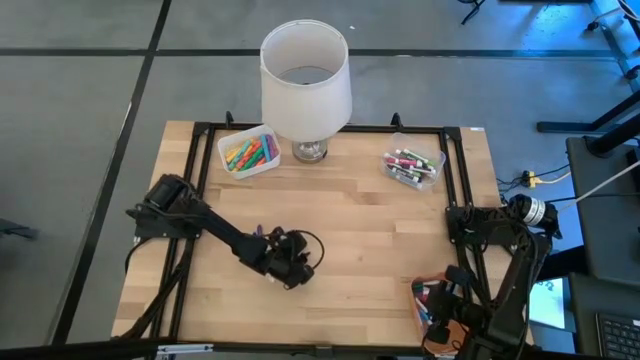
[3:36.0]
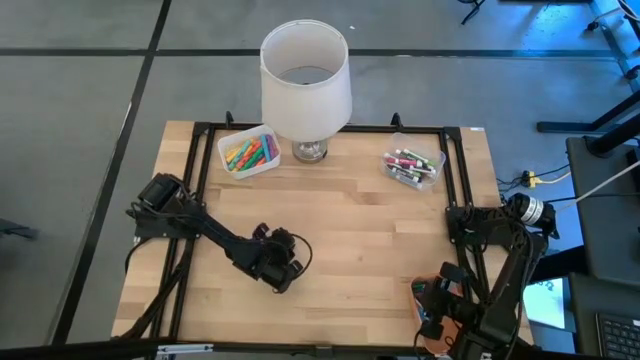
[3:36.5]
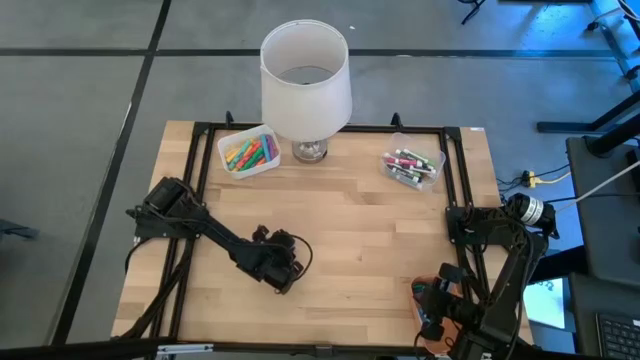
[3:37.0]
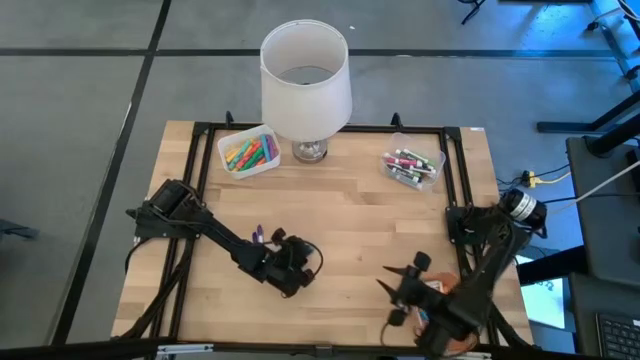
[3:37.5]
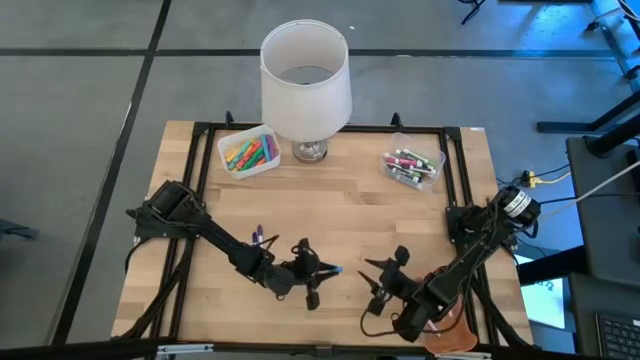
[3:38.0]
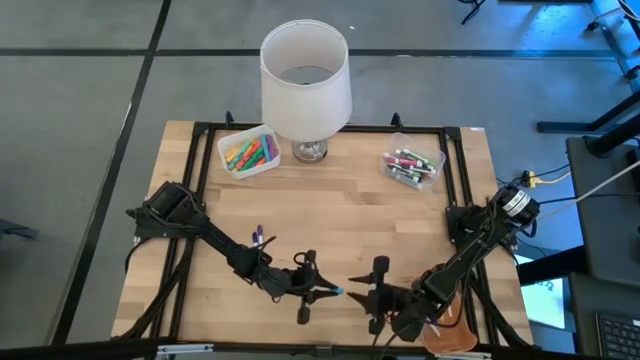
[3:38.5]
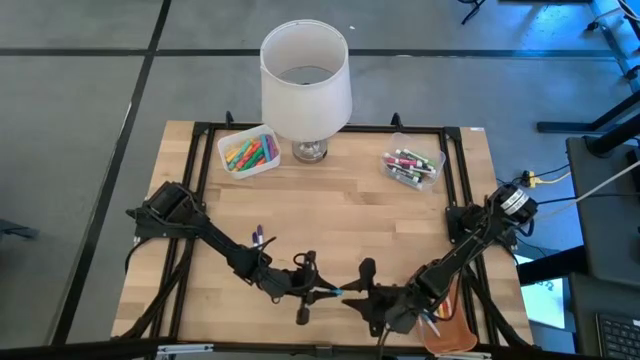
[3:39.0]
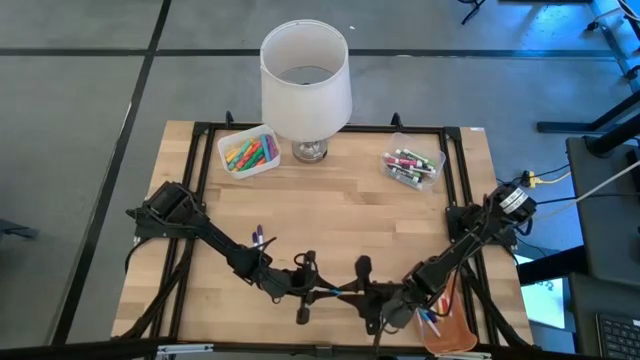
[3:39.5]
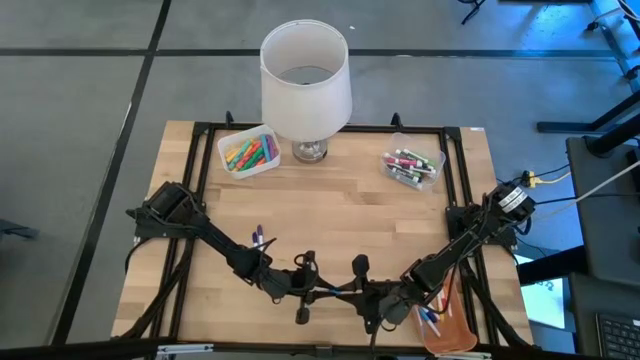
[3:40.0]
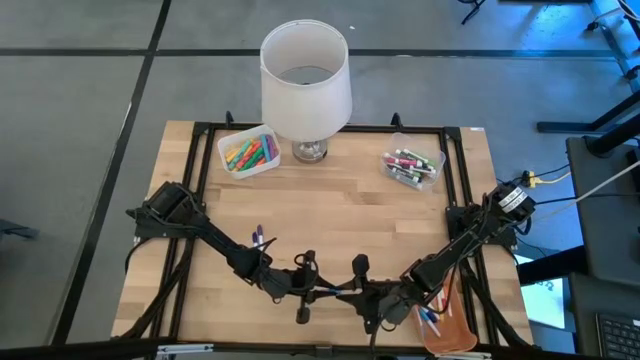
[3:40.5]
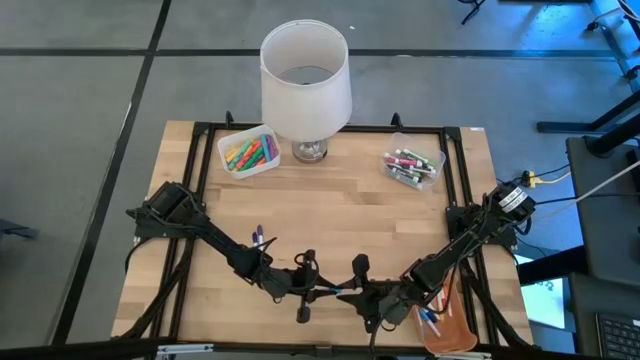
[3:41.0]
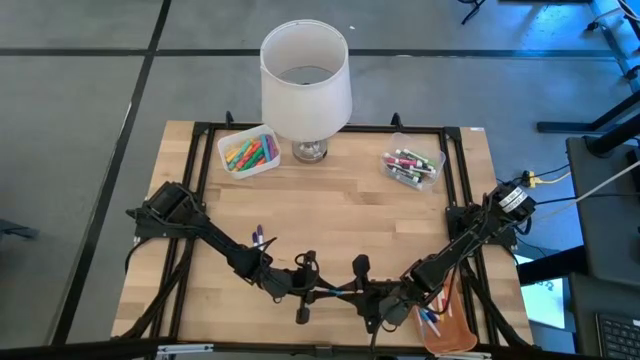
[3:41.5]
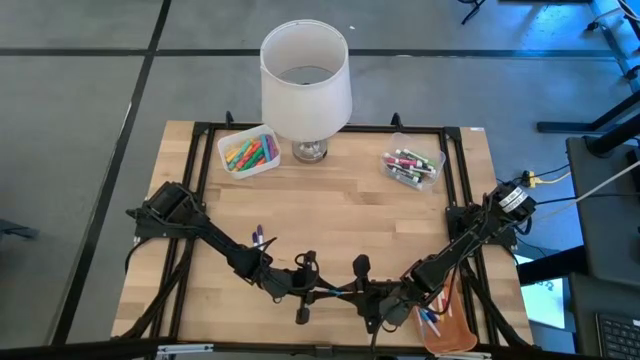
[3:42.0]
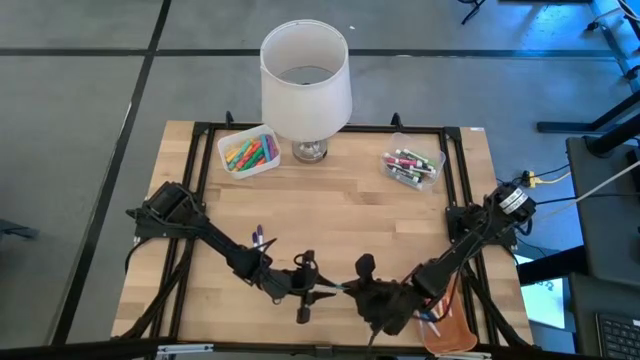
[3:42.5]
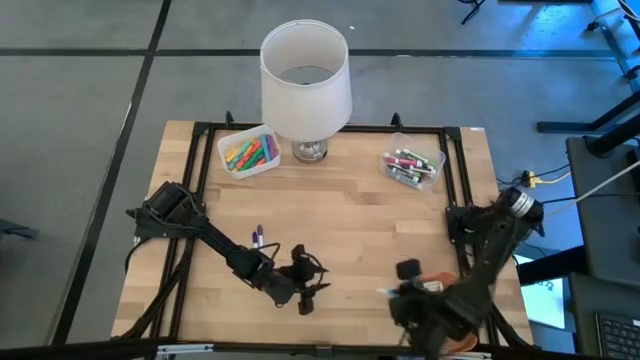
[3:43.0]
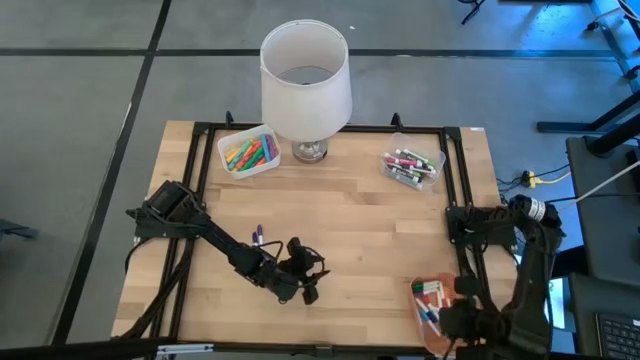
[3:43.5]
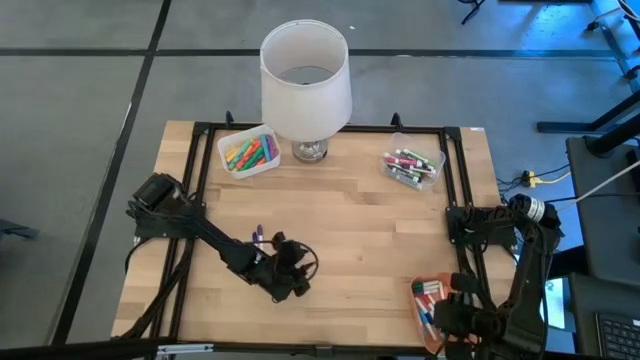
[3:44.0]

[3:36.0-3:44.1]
Task: Pick & Place Markers
Put the light blue mini marker into the orange bin

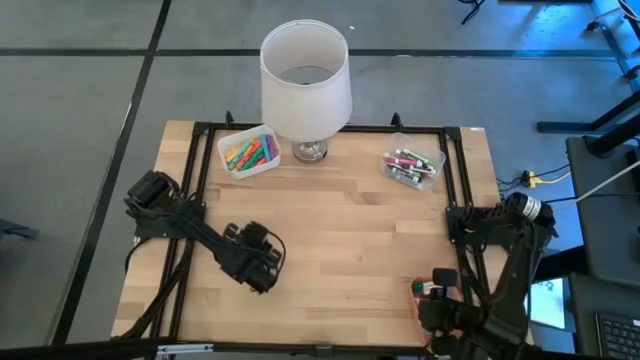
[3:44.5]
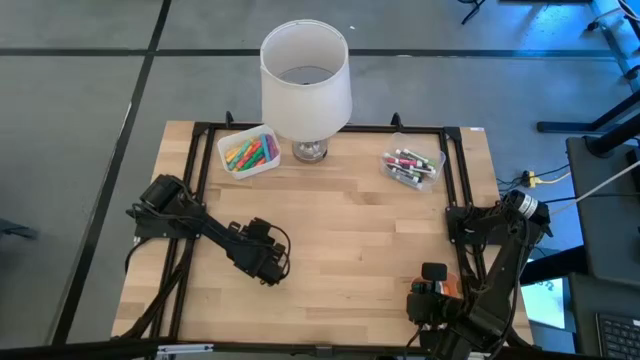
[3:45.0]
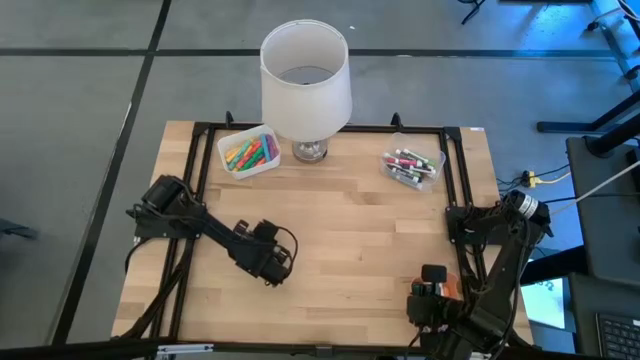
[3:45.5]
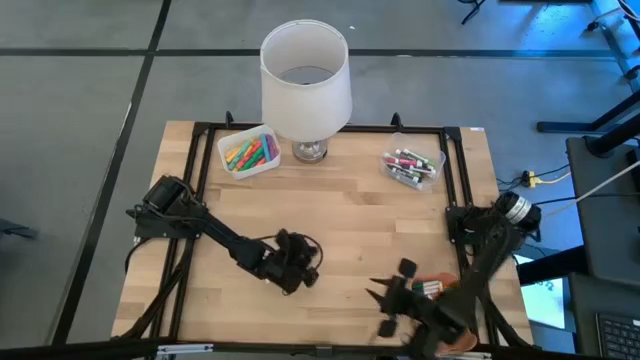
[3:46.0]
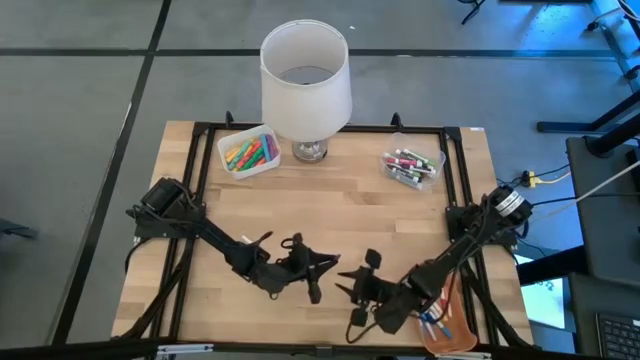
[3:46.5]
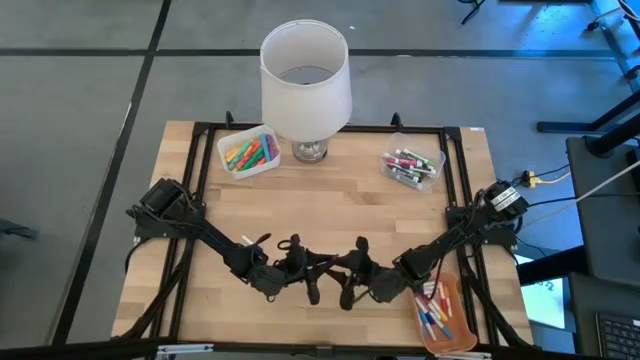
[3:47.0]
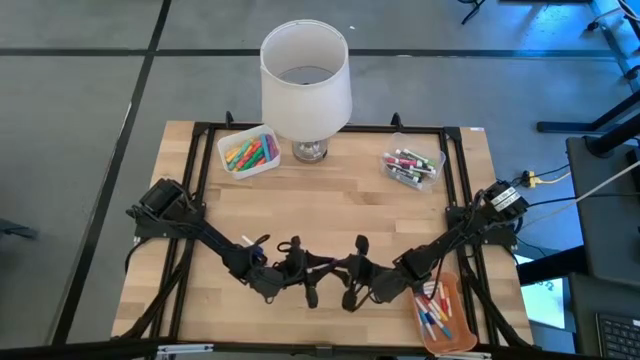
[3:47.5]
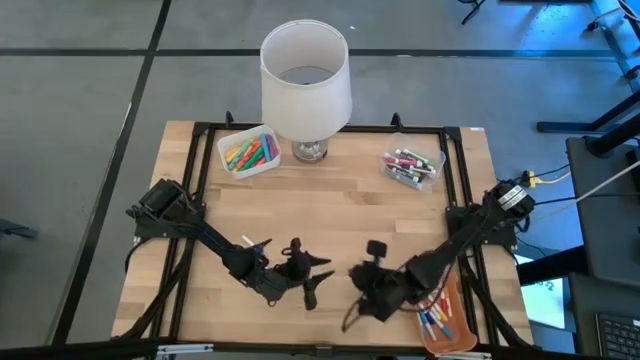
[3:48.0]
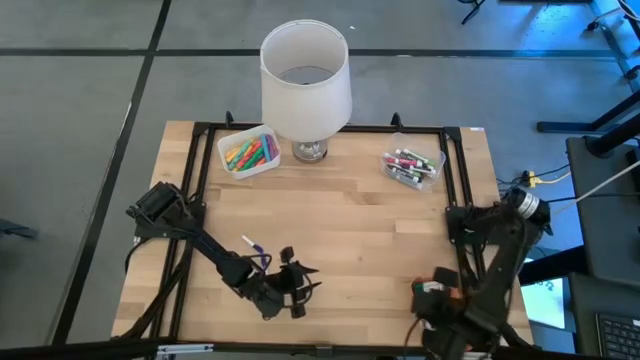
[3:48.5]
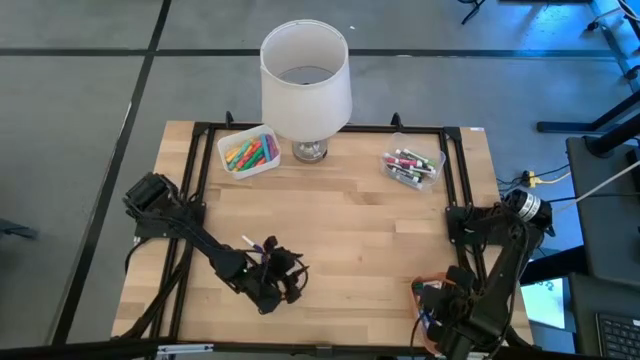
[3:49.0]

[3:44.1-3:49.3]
Put the purple mini marker into the orange bin

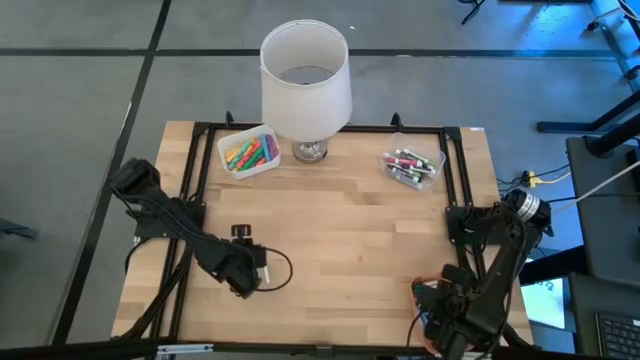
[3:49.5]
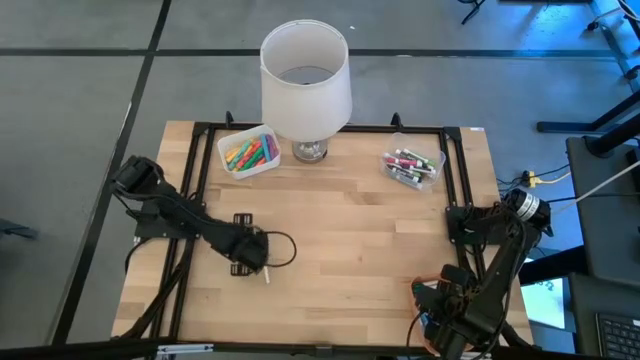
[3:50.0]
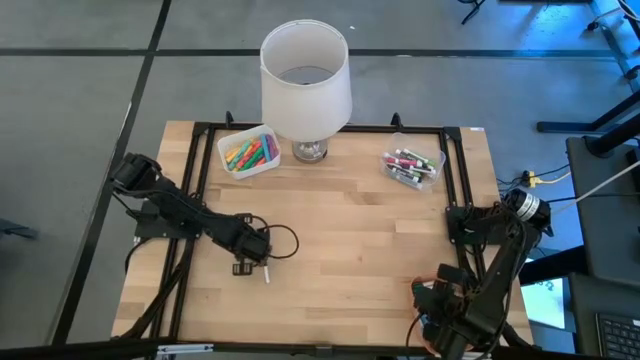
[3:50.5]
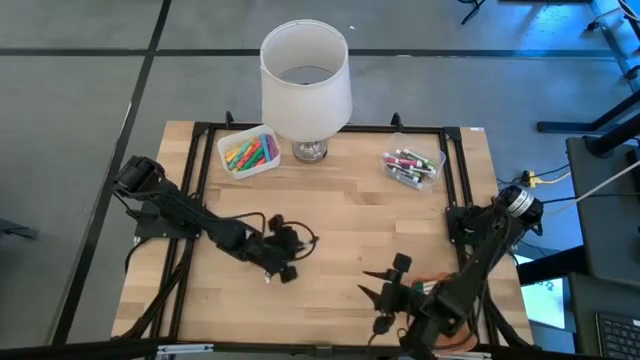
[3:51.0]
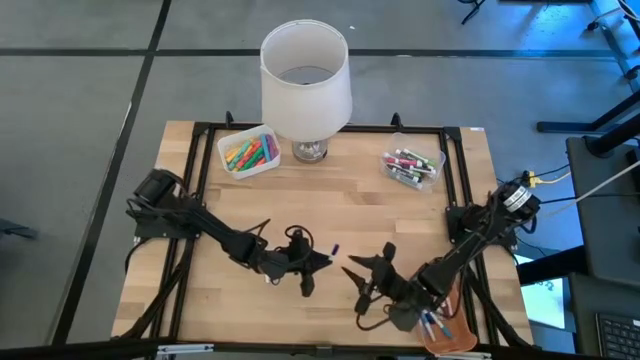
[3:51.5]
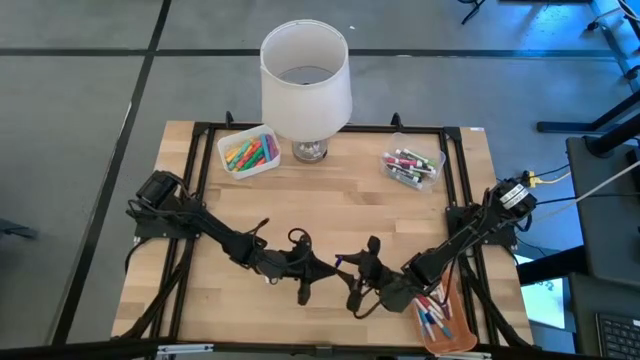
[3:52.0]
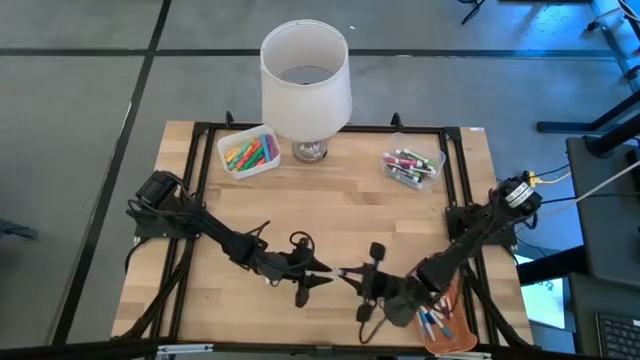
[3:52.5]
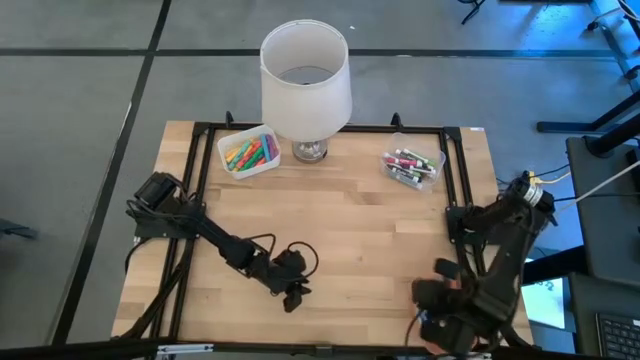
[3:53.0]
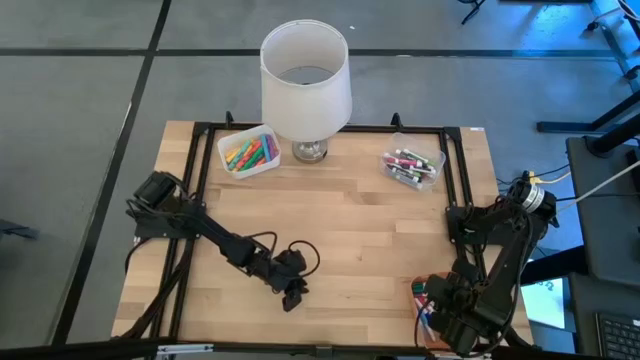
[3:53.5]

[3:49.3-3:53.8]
Put the dark blue mini marker into the orange bin

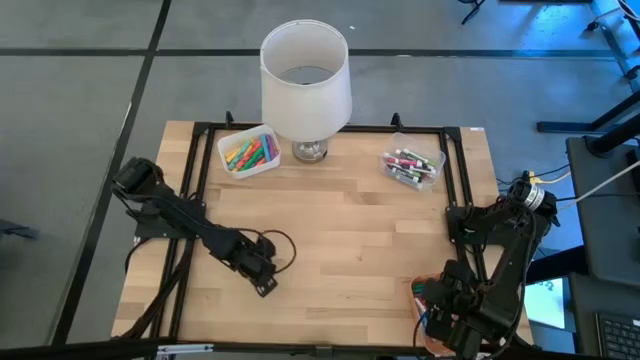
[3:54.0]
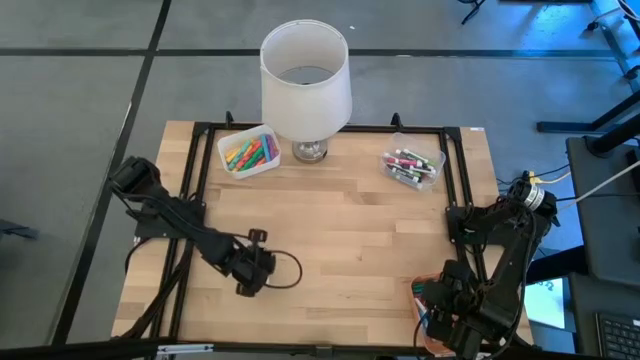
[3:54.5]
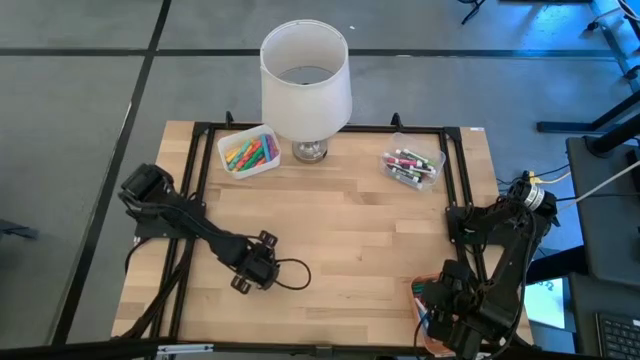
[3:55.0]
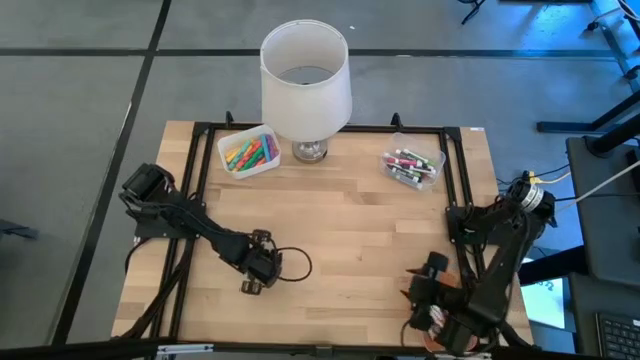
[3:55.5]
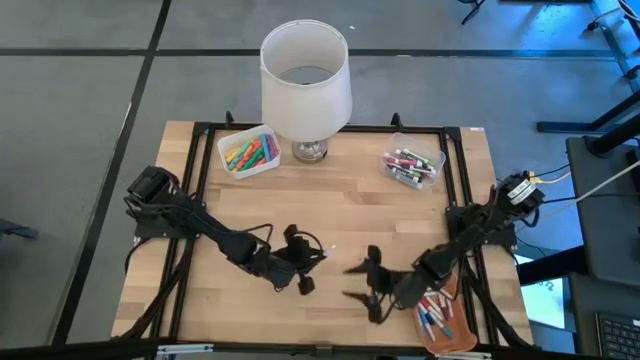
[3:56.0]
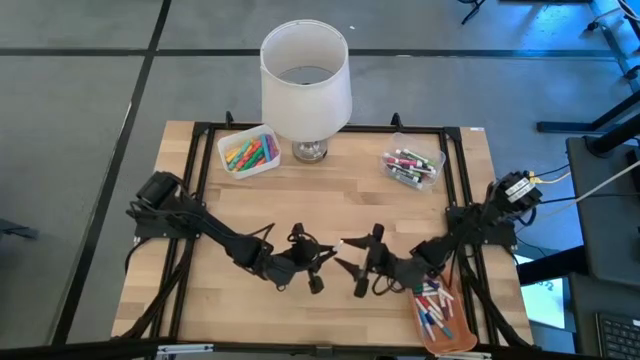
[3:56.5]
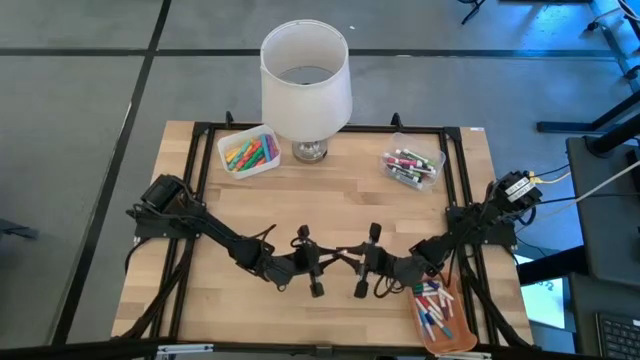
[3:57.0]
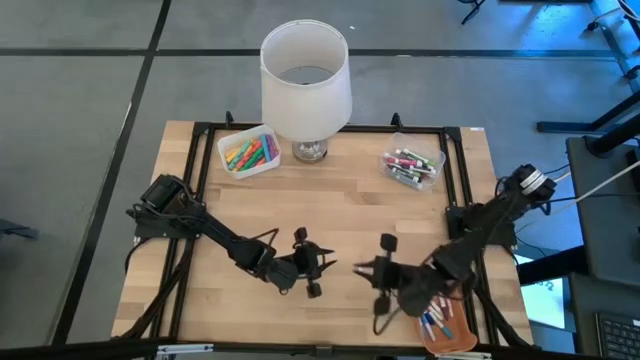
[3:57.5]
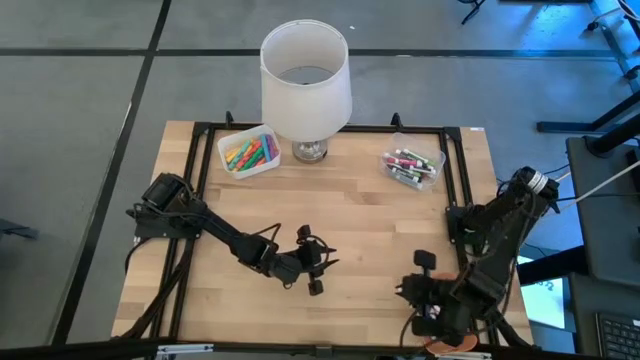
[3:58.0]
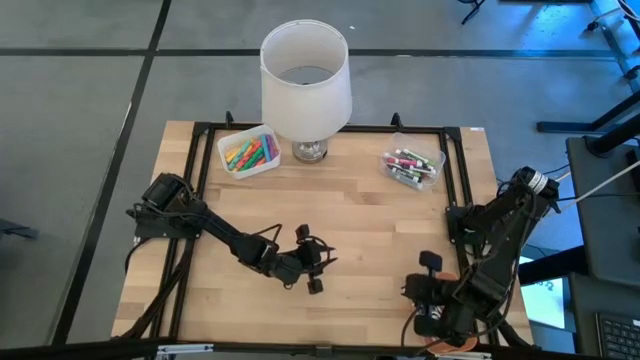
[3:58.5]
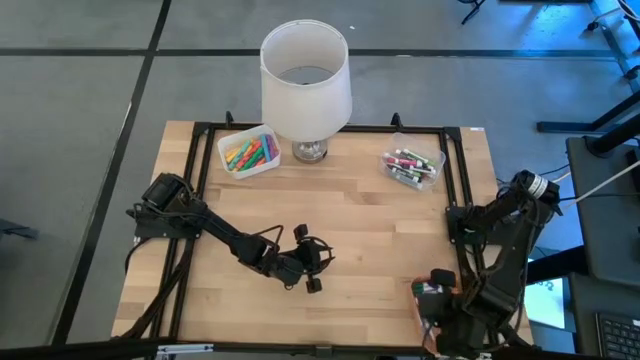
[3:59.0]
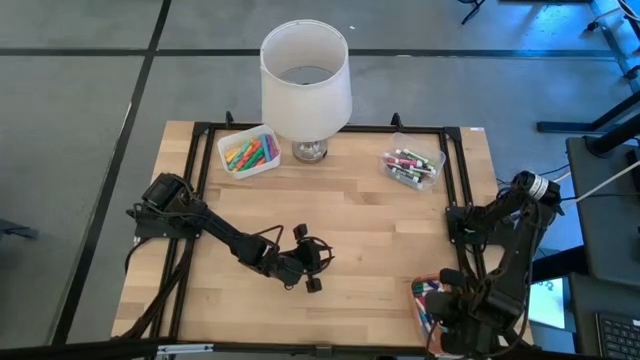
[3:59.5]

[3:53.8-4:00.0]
Put the dark blue mini marker into the orange bin
